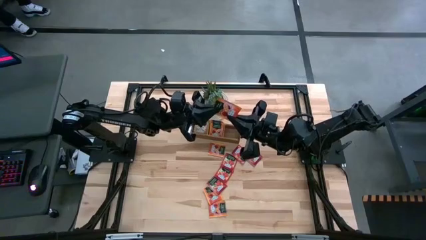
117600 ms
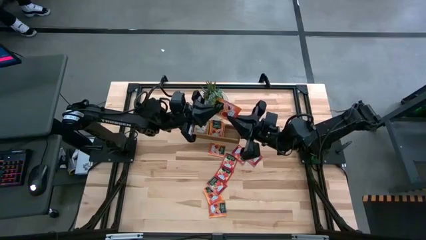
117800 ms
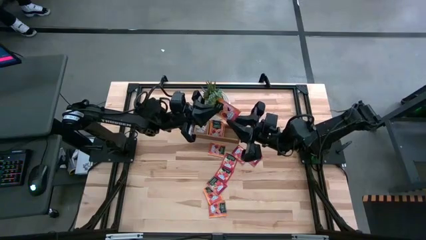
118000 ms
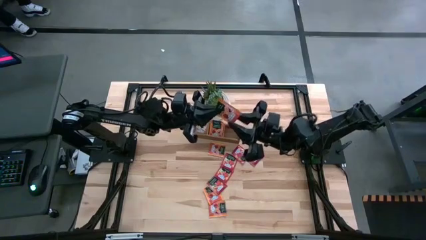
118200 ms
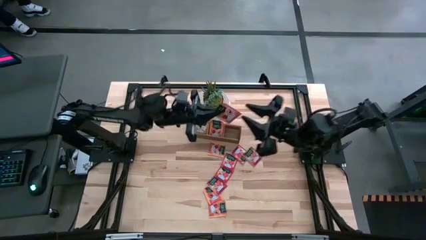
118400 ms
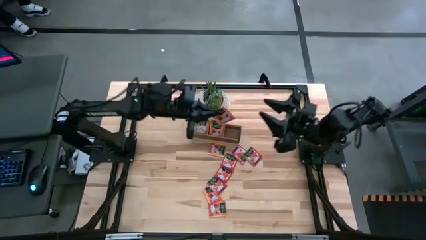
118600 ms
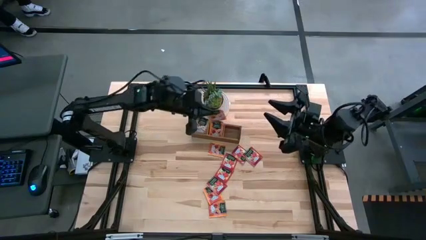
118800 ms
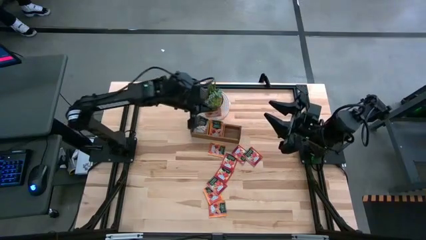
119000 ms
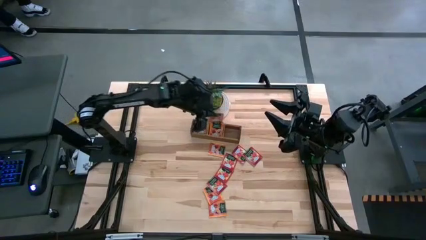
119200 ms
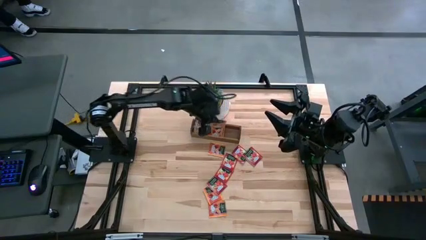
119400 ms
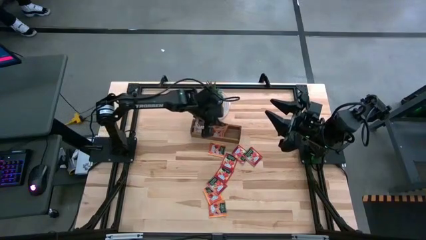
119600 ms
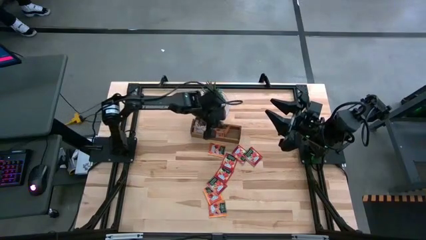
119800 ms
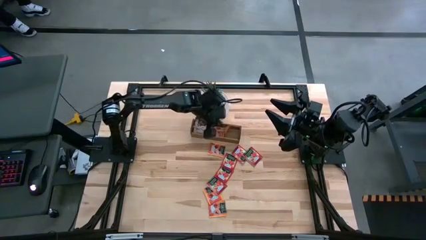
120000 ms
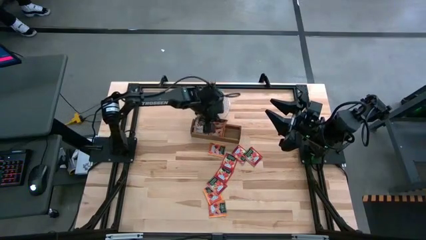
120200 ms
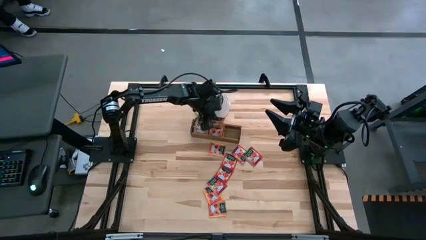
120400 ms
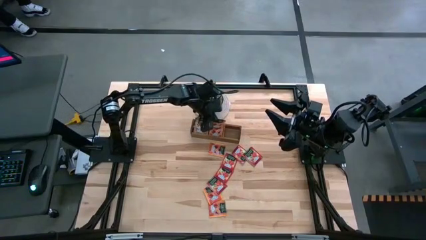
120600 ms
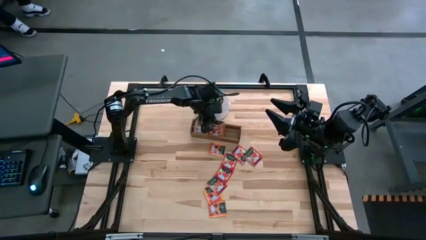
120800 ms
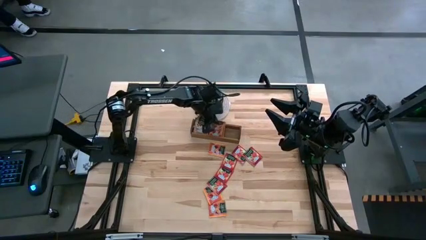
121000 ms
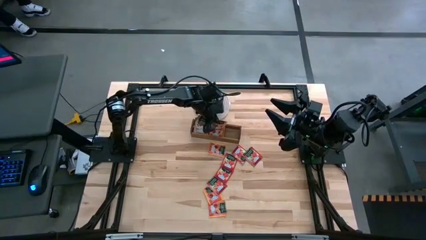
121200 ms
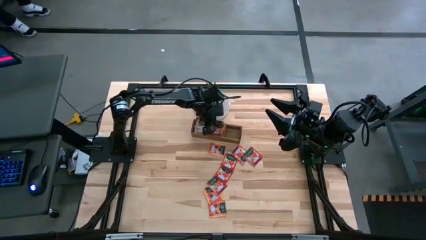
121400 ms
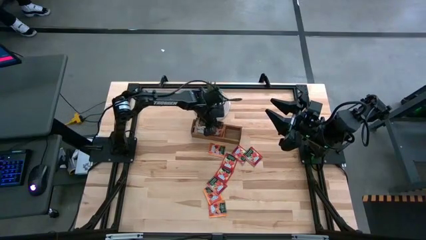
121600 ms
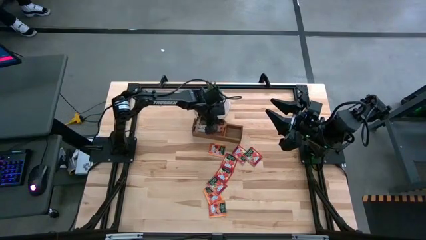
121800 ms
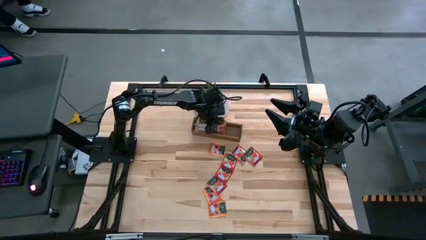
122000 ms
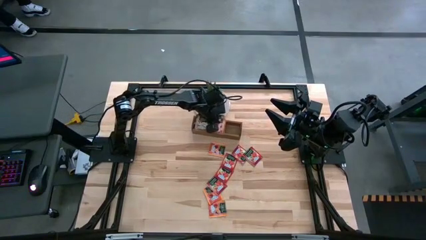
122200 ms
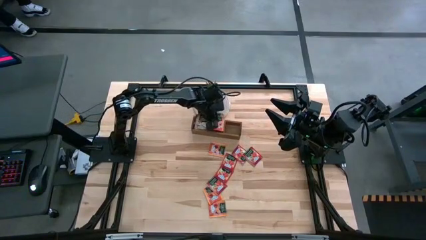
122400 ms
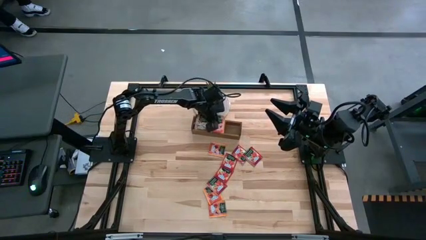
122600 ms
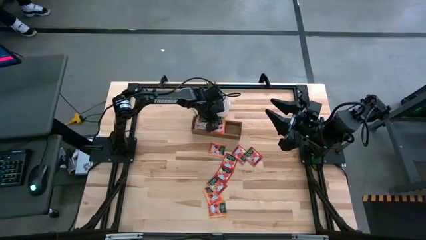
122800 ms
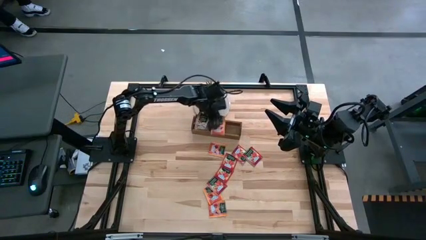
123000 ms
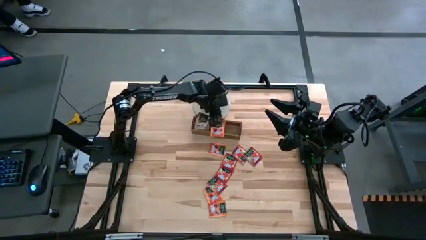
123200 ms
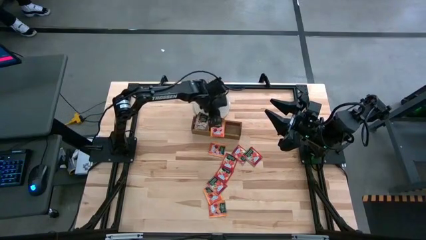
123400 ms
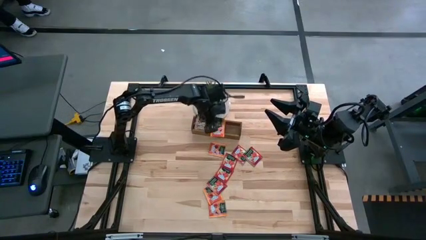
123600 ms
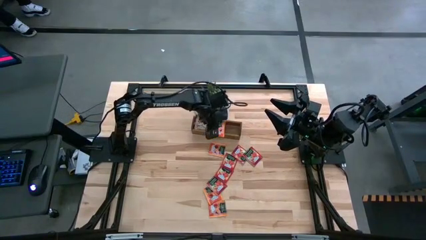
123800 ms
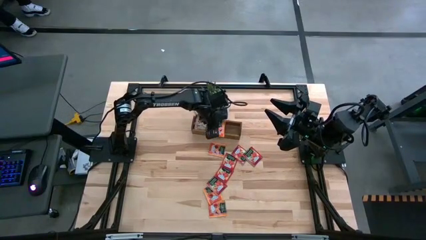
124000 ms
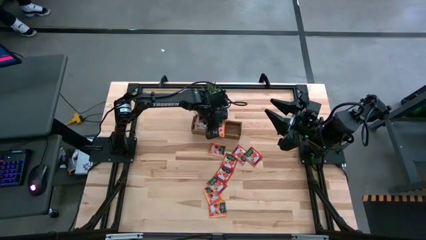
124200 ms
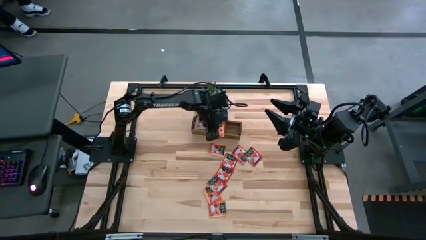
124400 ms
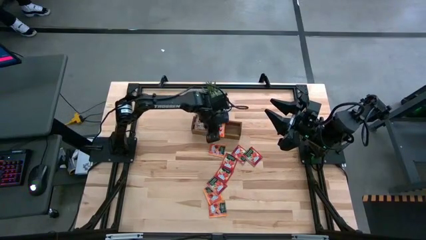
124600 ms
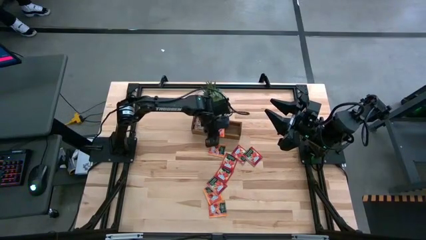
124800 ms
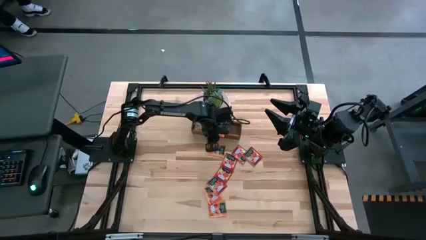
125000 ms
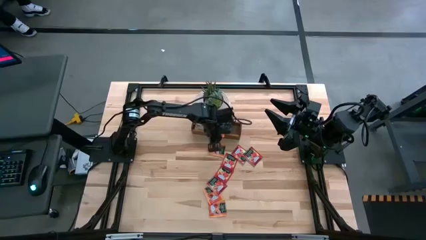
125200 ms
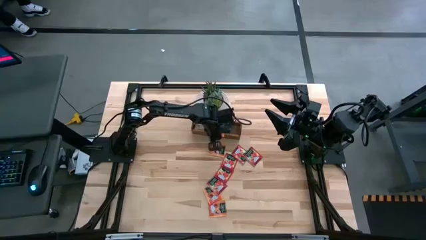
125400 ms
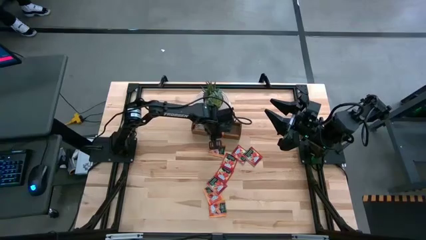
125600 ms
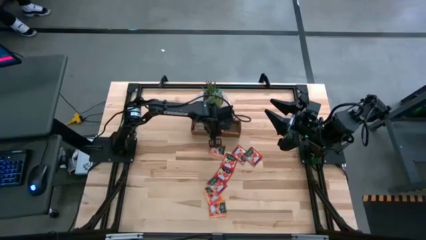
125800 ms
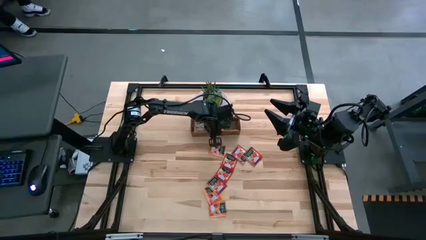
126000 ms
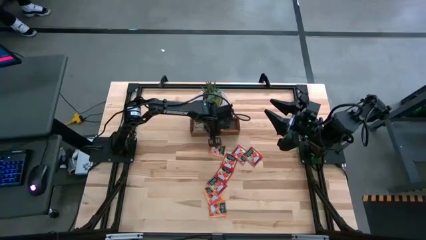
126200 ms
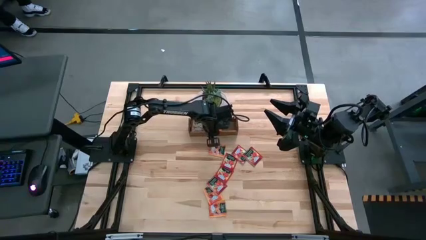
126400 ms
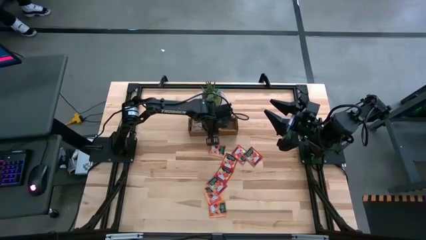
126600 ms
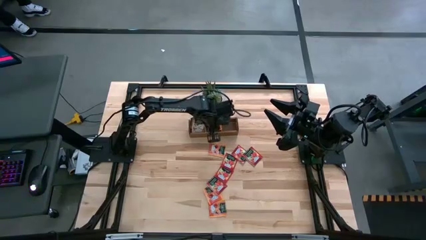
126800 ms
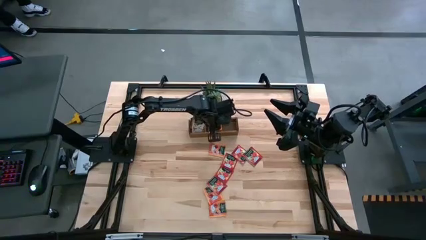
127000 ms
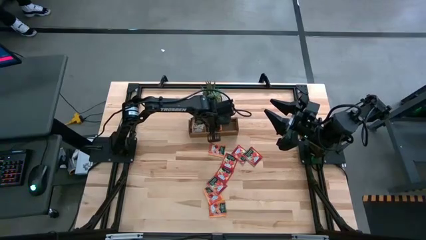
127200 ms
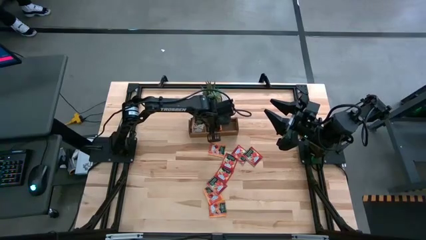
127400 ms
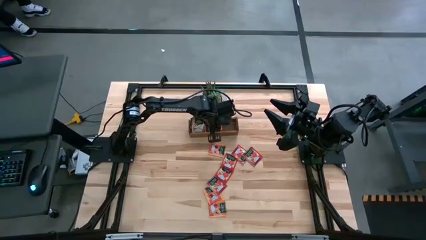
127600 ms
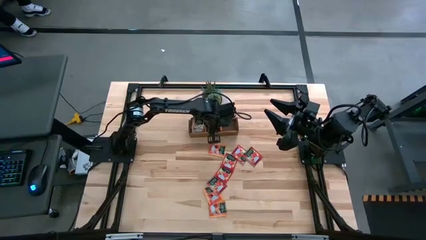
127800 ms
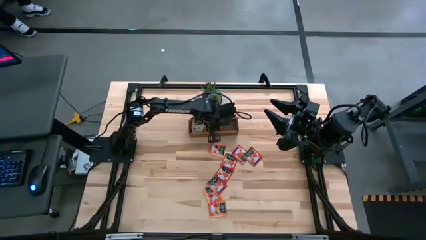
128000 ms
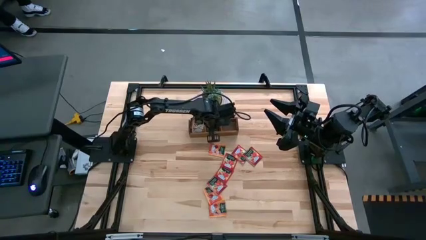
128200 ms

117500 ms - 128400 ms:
Task: Pick & Place Tea
Put the orange tea bag into the middle section of the wooden organizer

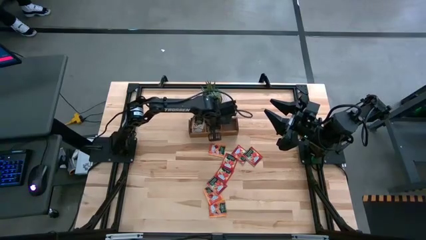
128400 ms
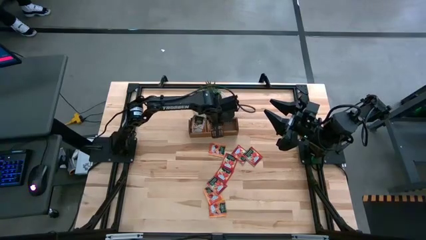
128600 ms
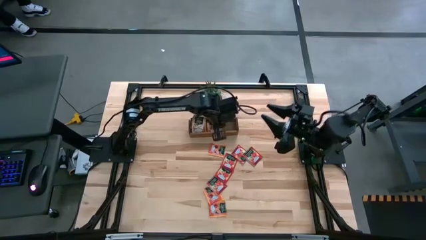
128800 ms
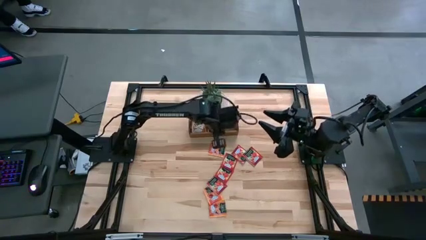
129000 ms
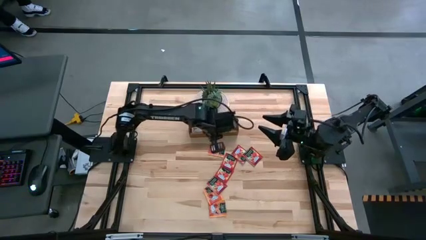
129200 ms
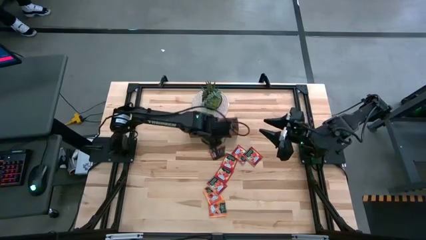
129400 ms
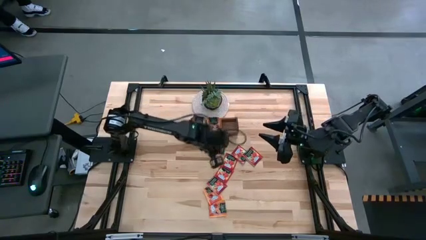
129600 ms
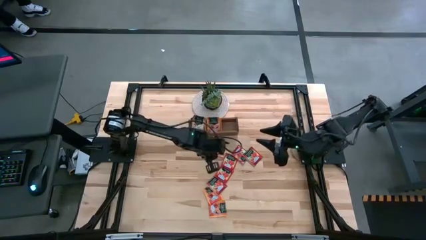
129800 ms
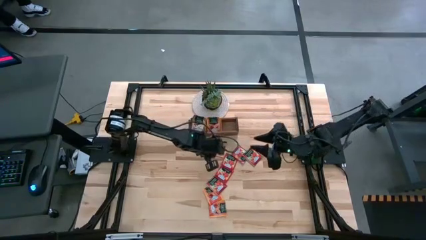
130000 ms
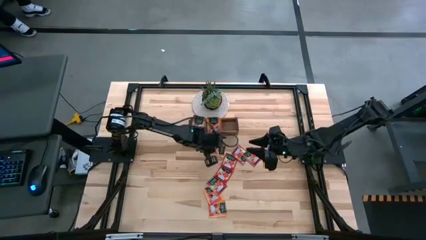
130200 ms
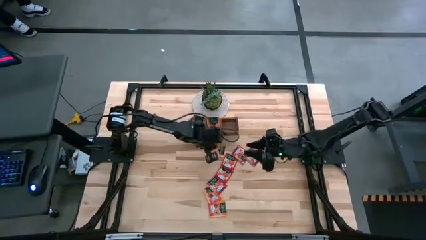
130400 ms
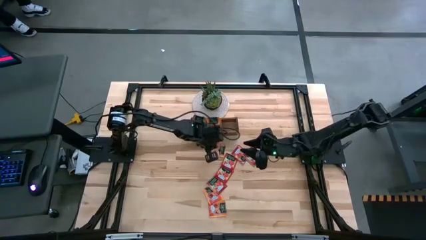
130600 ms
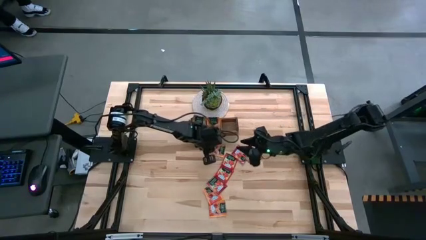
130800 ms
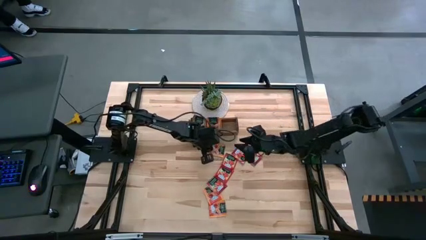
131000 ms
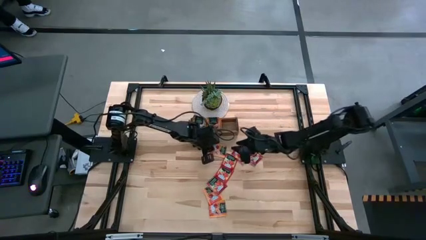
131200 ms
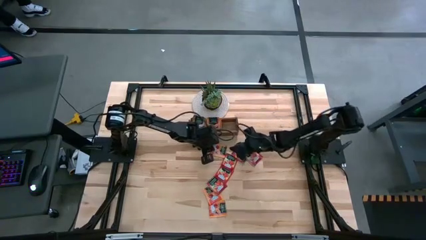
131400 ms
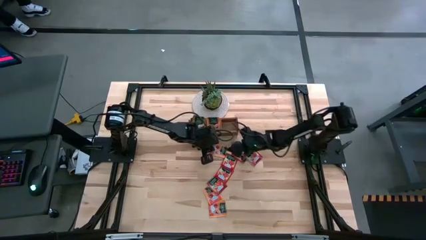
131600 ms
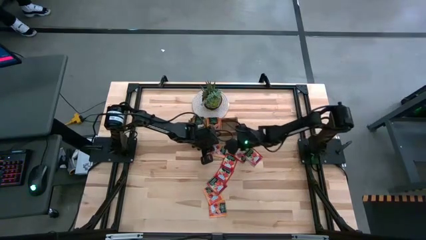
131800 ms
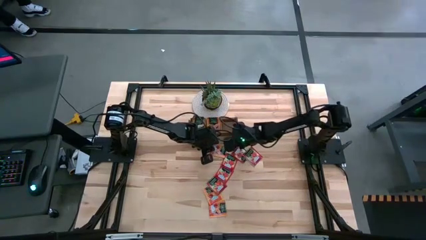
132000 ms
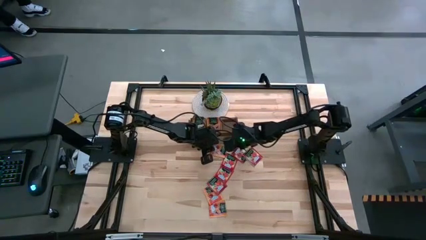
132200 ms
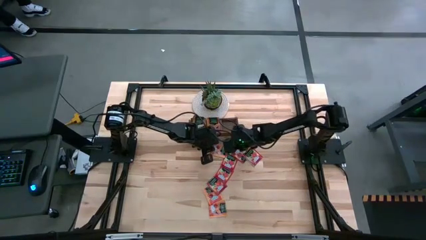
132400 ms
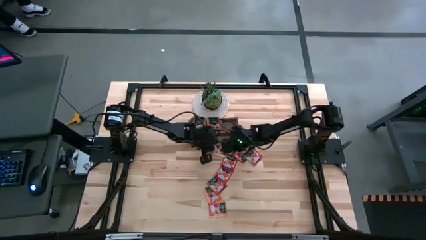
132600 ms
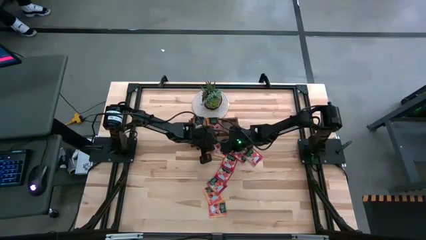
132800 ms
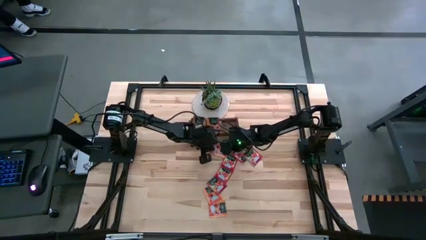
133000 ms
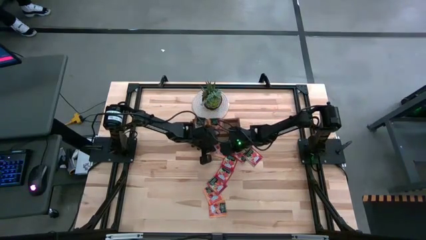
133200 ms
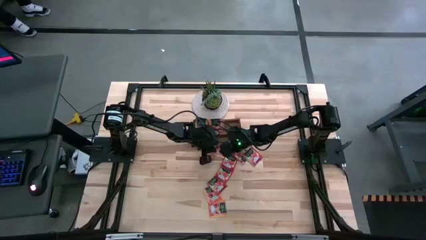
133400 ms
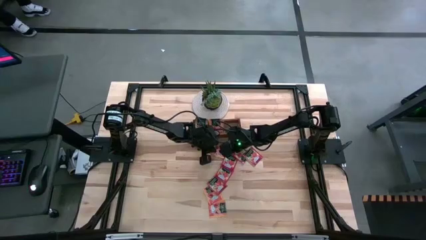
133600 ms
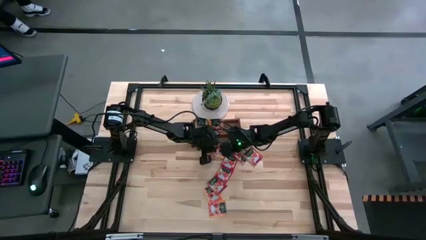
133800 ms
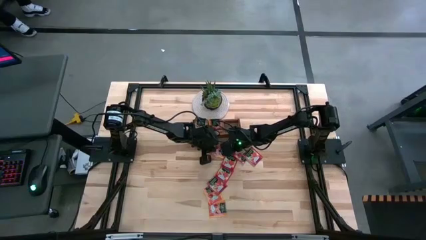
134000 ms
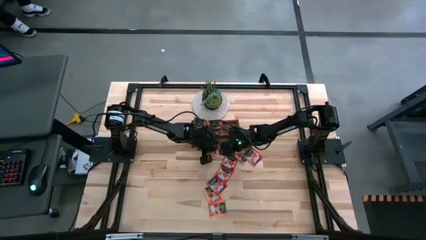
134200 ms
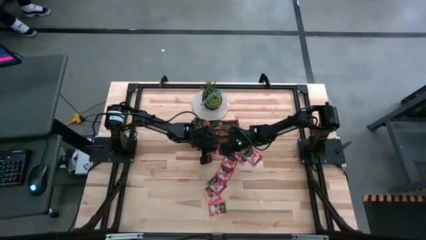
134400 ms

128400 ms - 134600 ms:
Put the top orange tea bag into the middle section of the wooden organizer
